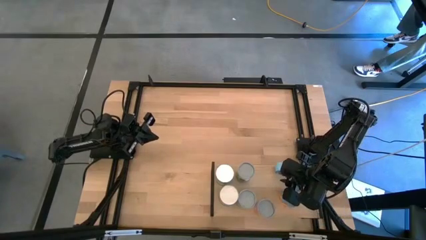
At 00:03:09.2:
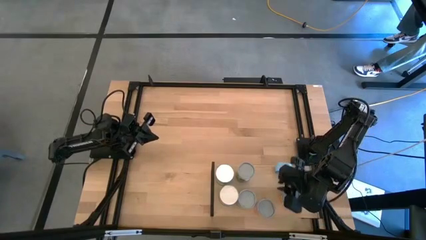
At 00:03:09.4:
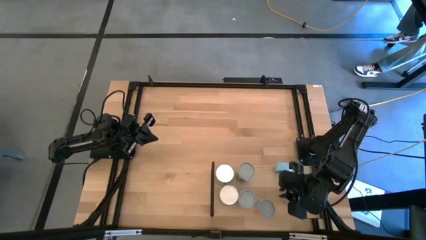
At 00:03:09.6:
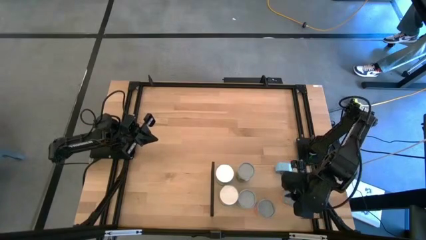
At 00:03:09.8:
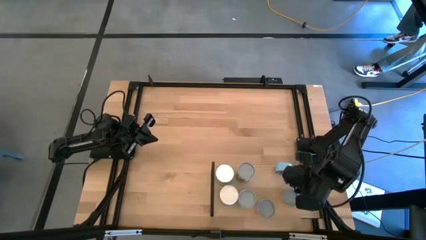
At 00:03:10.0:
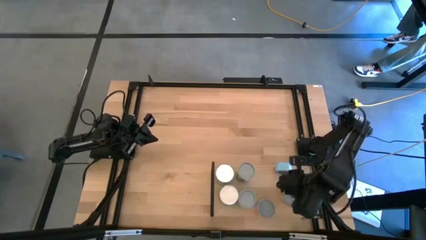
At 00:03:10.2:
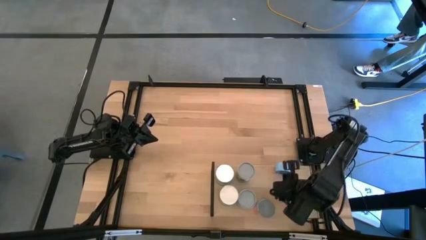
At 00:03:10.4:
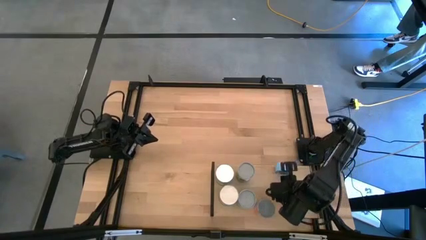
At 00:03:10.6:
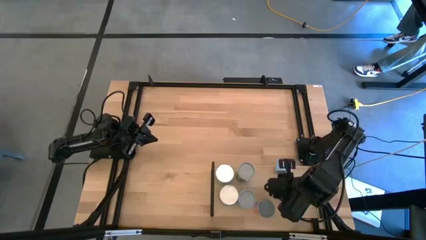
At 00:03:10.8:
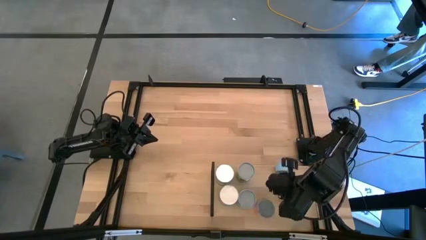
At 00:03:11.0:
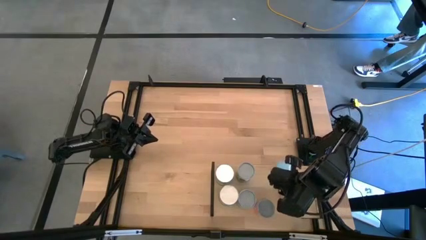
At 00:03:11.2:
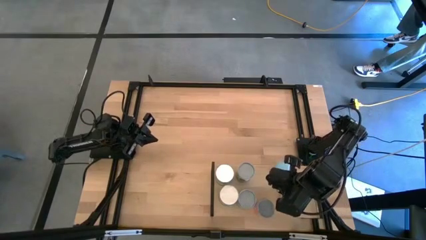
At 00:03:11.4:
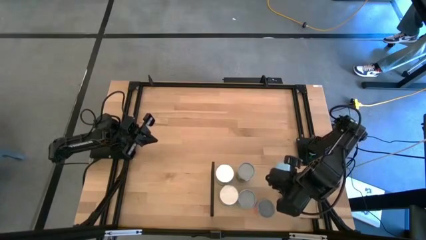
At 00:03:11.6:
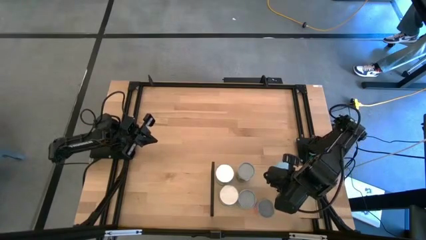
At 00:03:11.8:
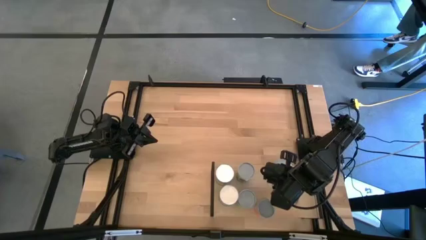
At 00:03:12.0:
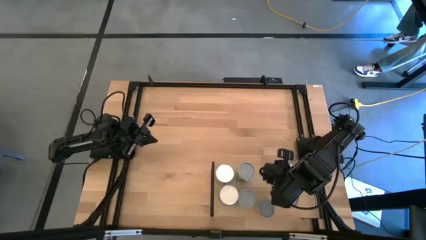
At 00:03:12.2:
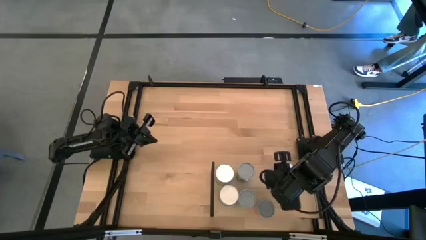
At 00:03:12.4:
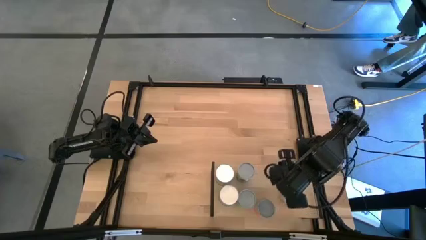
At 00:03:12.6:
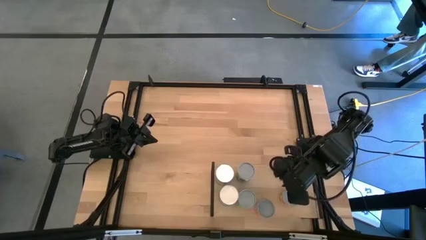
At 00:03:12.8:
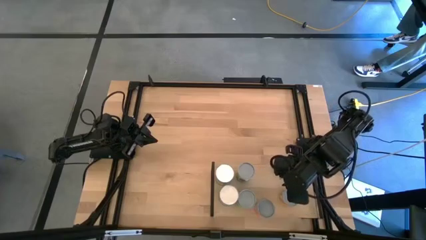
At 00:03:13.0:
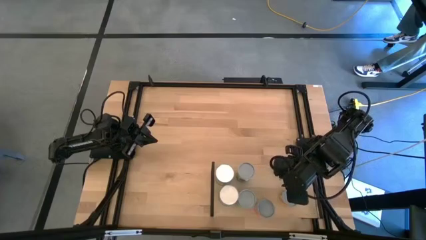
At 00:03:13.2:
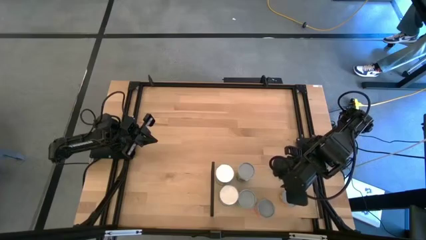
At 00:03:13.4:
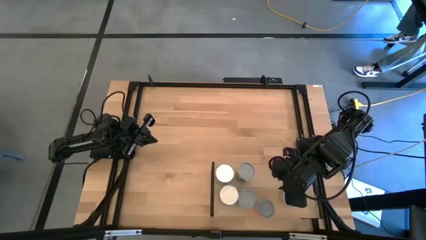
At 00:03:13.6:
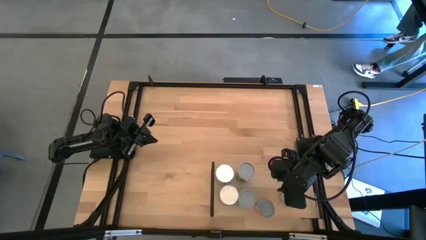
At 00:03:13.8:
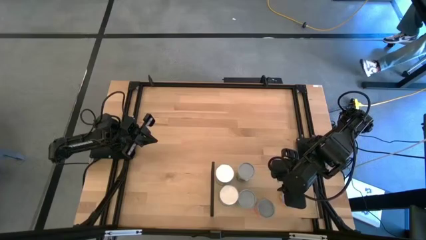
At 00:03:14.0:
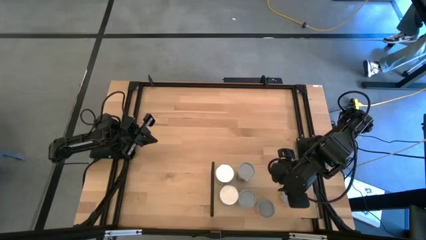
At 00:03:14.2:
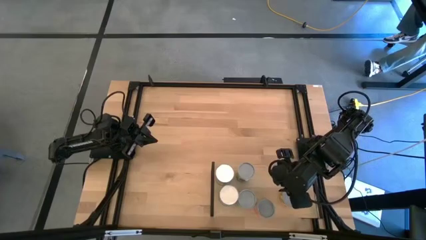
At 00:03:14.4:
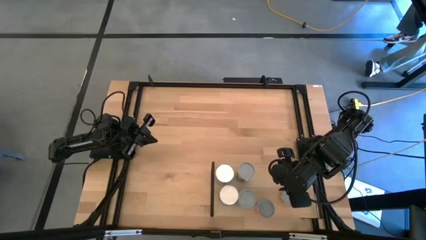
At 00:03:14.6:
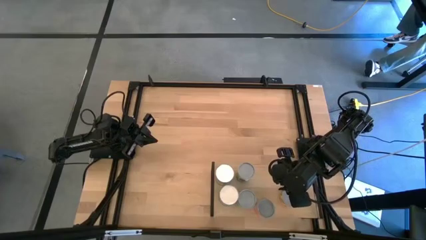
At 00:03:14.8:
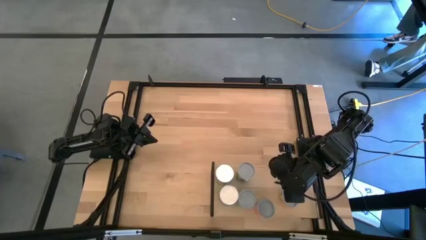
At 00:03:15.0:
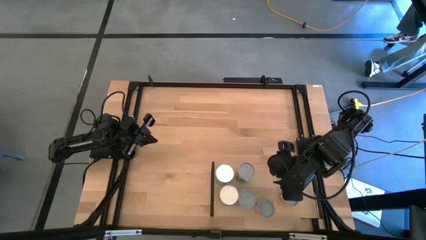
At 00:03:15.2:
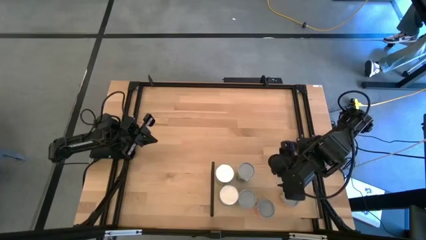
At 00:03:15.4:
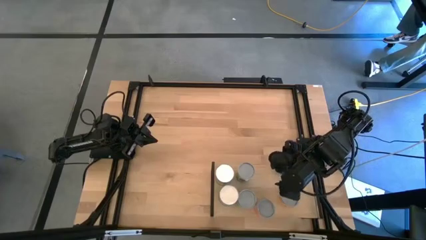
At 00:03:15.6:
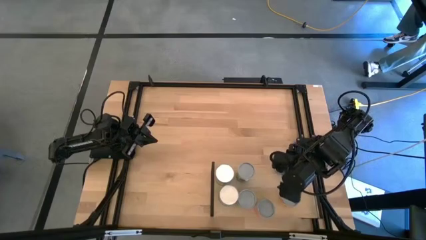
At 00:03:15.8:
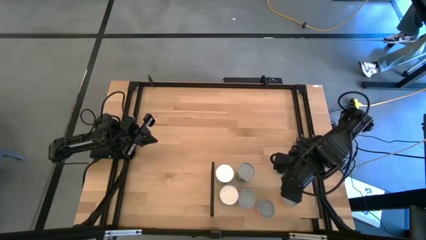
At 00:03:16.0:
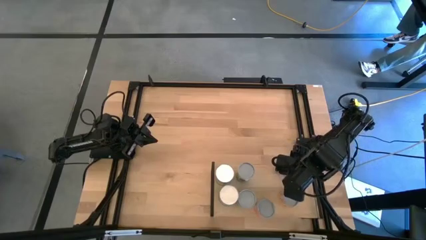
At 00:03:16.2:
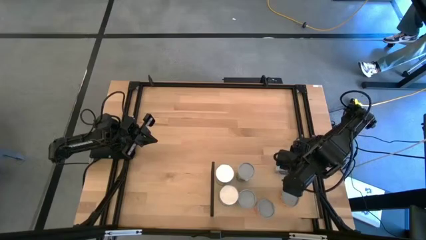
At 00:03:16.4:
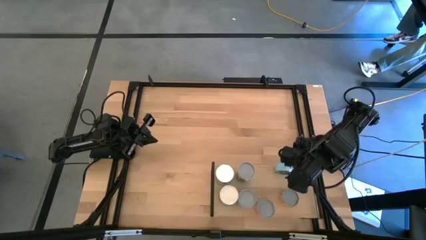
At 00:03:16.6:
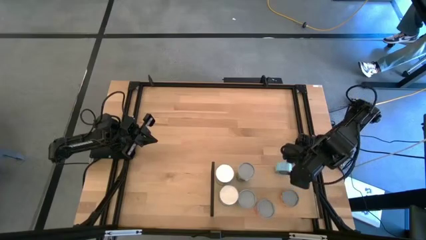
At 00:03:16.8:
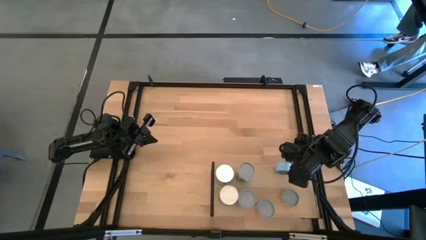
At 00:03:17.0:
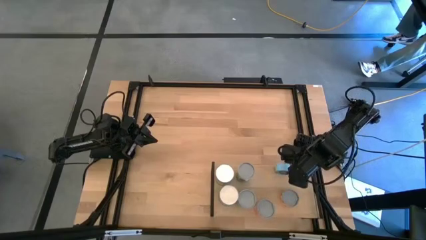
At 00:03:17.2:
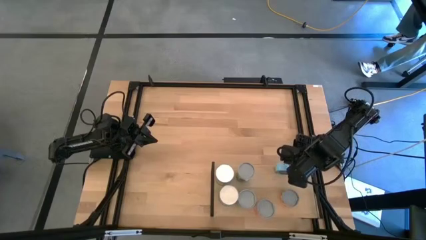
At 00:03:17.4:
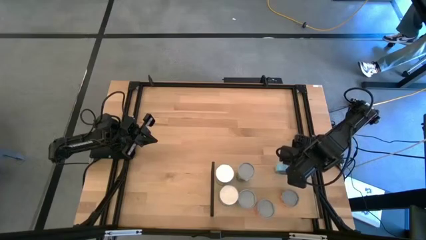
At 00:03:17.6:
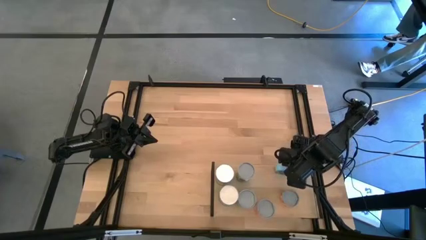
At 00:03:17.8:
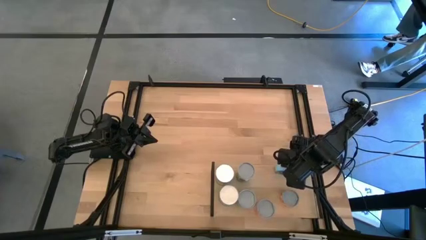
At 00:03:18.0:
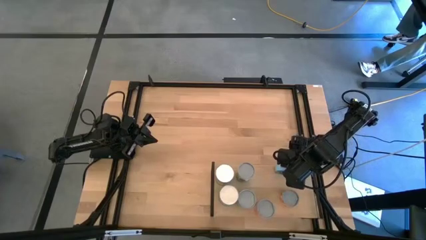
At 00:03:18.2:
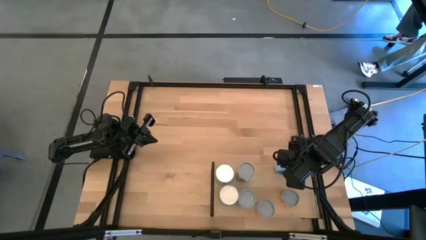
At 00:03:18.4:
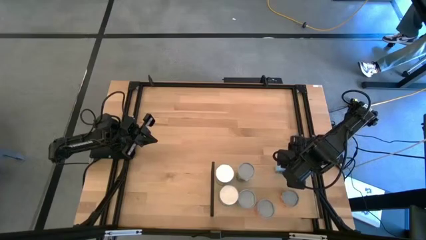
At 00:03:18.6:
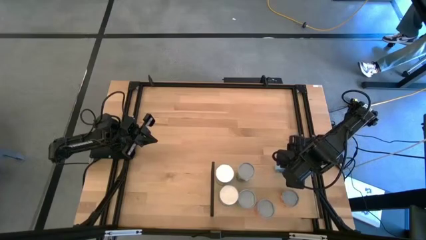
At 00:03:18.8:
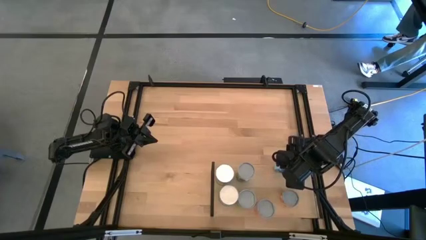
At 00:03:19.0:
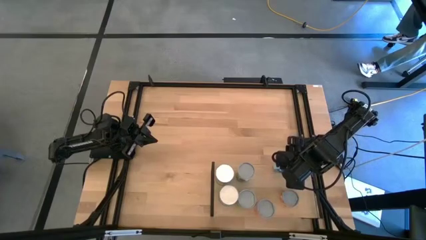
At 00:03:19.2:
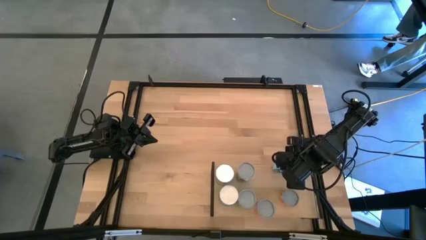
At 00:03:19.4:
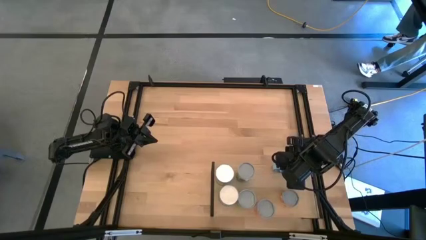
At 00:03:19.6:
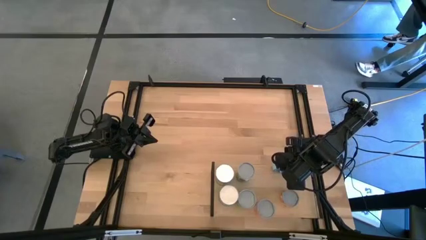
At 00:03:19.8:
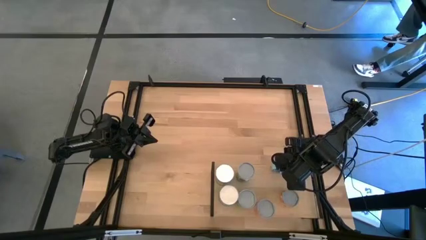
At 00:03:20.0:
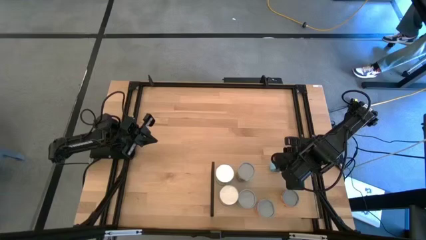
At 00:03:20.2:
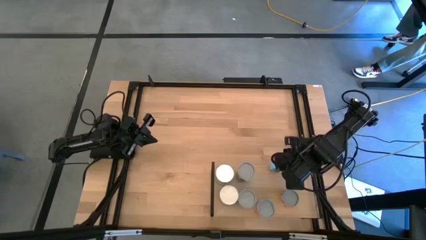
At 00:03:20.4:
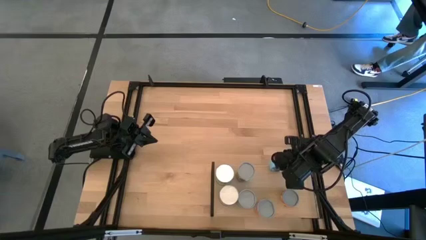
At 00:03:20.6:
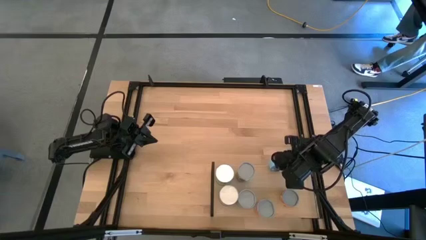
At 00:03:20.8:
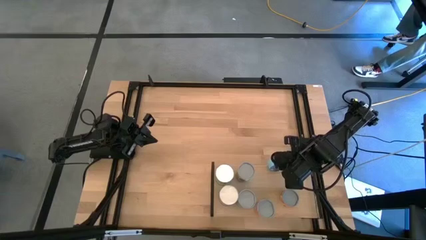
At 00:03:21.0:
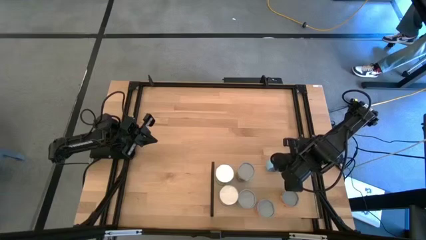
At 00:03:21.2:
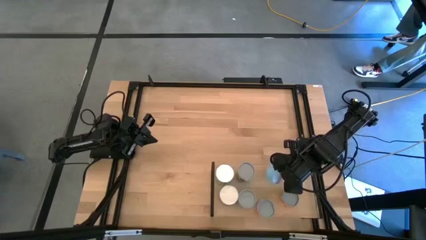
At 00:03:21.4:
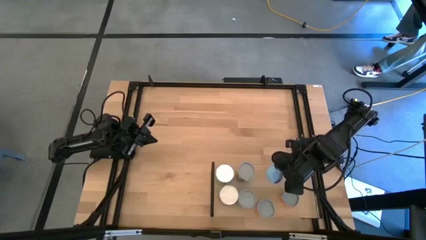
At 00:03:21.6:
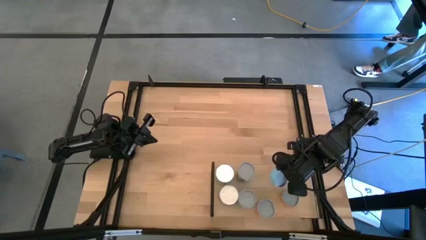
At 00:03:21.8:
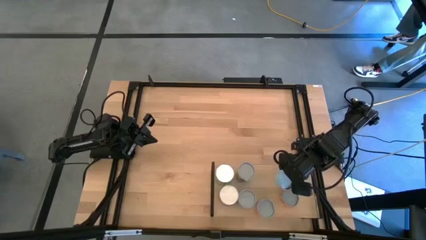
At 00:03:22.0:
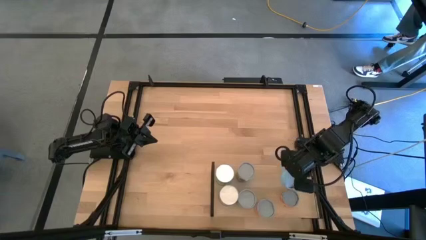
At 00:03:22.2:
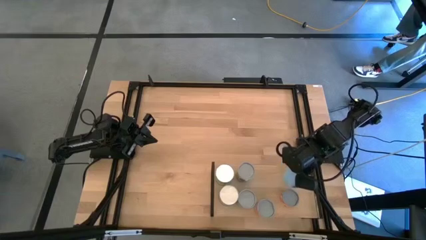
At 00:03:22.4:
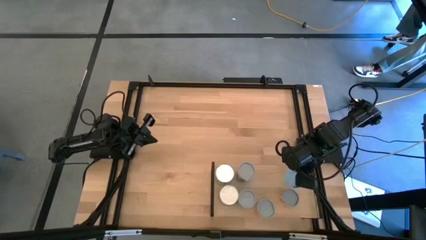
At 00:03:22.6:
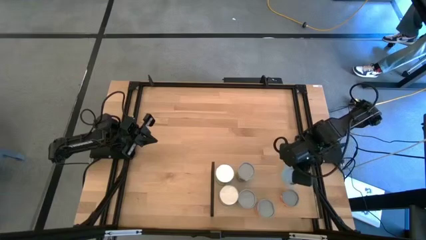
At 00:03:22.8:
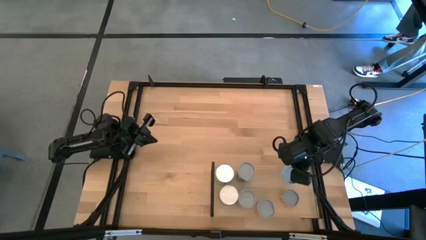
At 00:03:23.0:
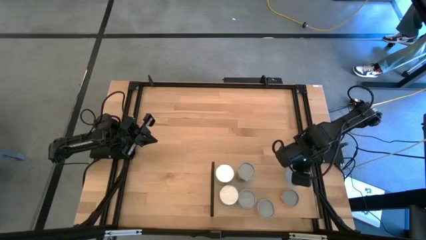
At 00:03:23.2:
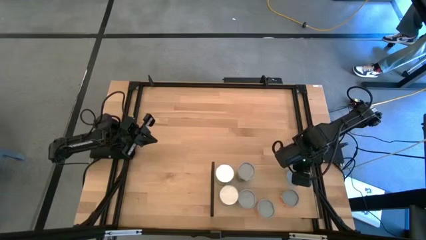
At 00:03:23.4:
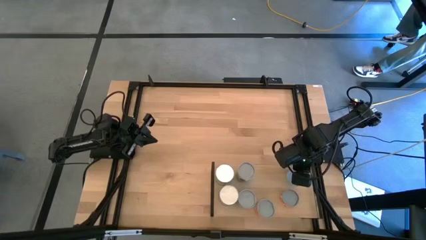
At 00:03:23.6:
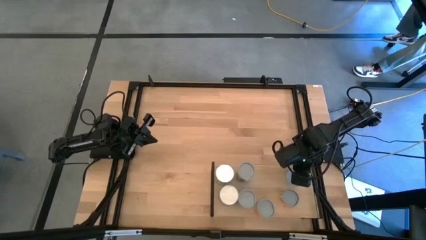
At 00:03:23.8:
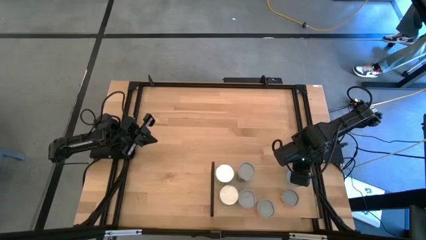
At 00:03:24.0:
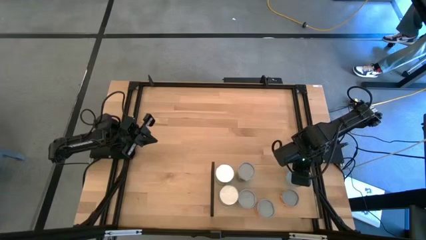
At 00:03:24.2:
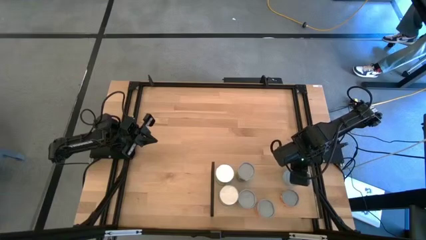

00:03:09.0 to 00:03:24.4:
Task: Pick and place cans onto a shelf
Adjust the tuna can on the shelf

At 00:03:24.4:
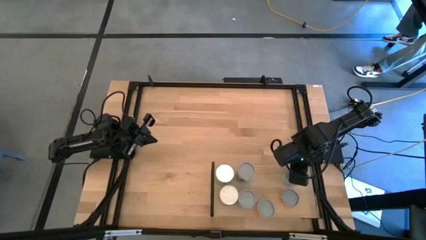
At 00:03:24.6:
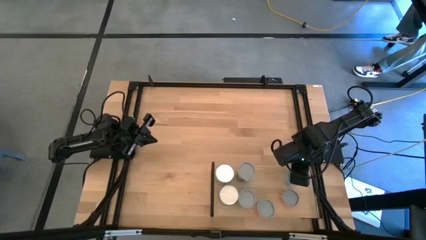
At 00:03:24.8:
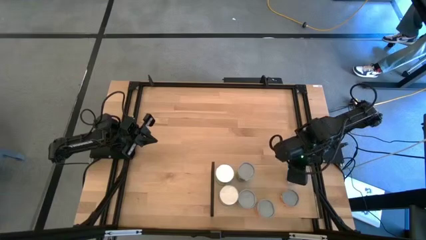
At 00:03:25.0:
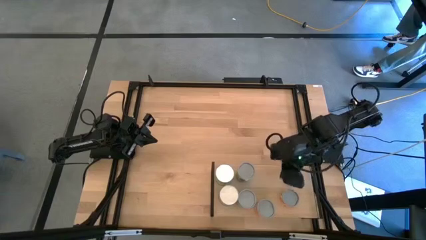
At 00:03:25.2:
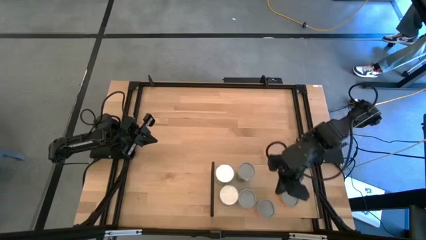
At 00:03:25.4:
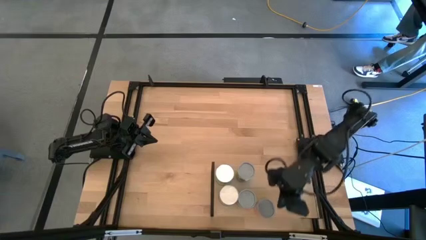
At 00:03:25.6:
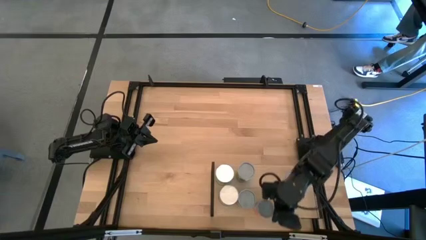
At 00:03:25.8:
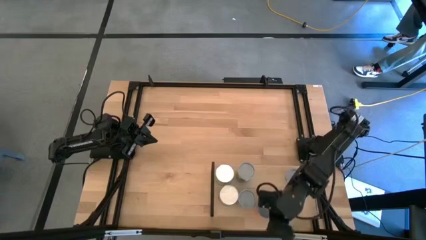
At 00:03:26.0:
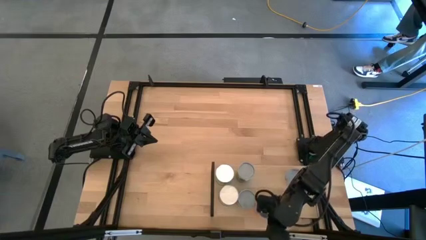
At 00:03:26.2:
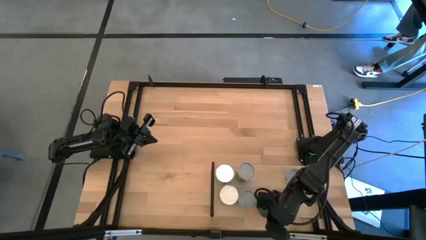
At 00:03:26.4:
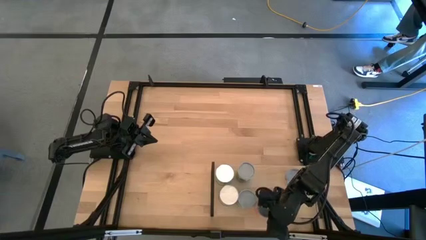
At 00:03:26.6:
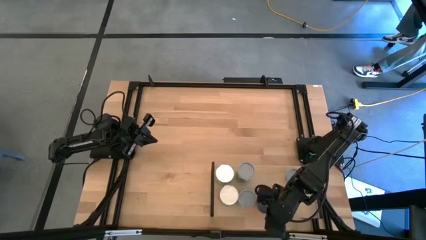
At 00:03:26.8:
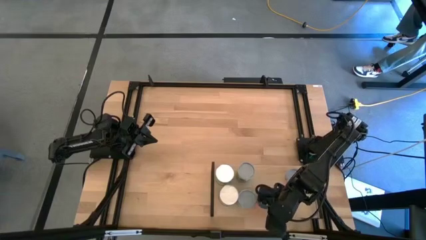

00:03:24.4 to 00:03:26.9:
Adjust the canned orange on the shelf
